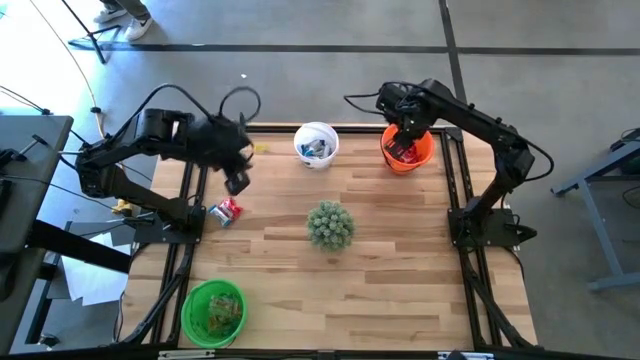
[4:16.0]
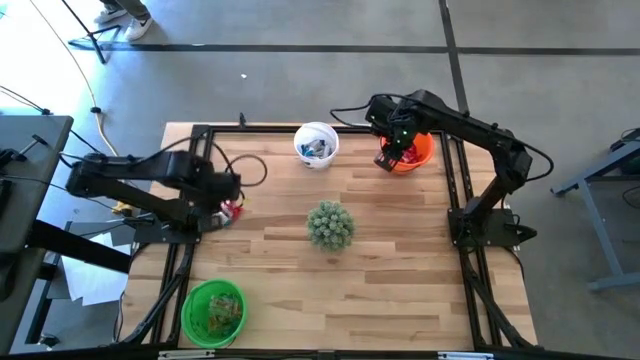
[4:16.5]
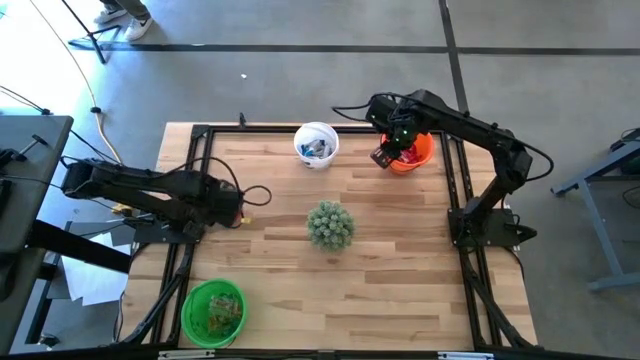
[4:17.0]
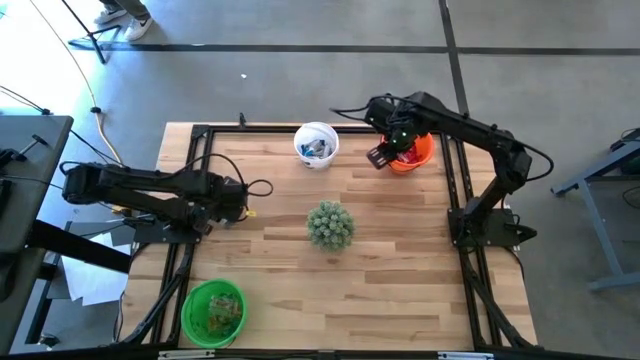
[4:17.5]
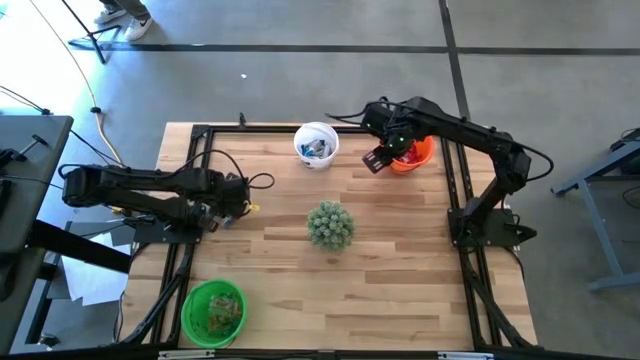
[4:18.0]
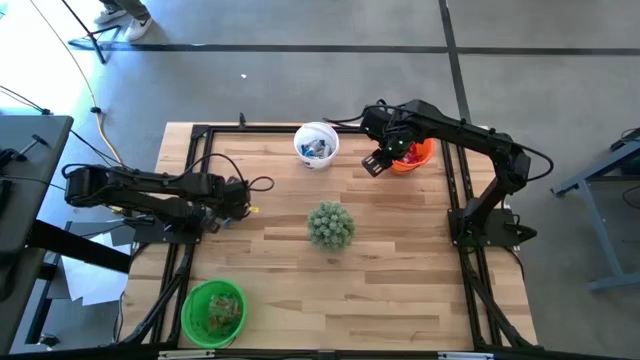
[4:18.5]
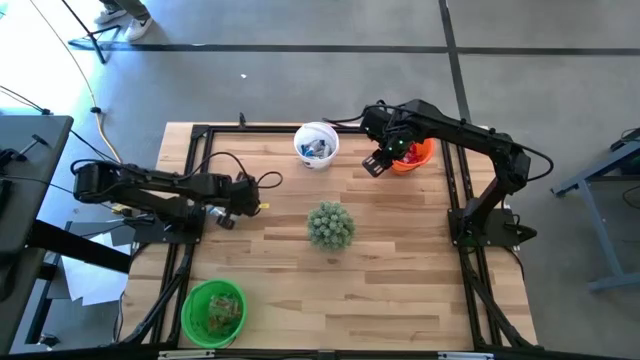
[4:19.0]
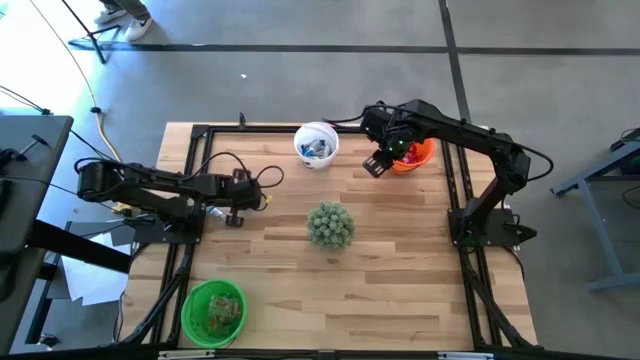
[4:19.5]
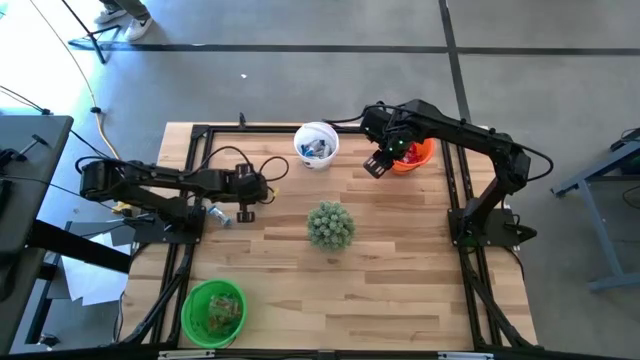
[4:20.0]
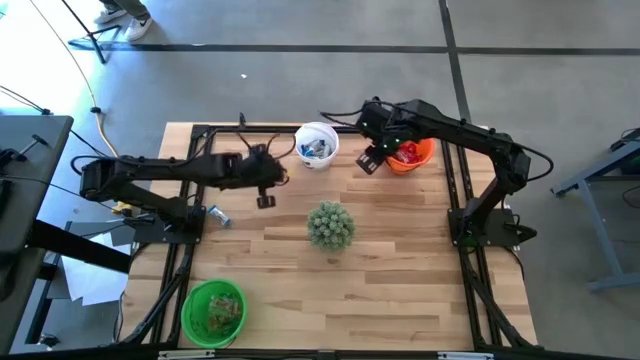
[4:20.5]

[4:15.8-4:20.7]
Task: Sort candy
Put the red candy into the orange bucket

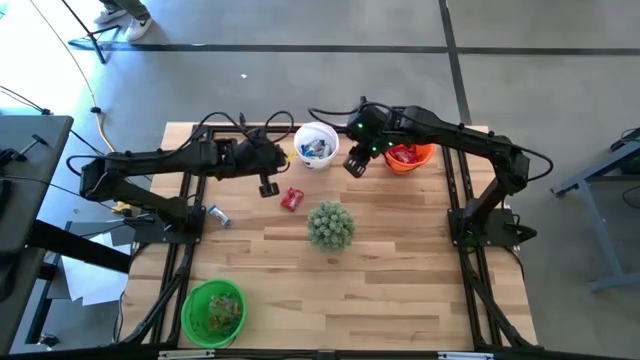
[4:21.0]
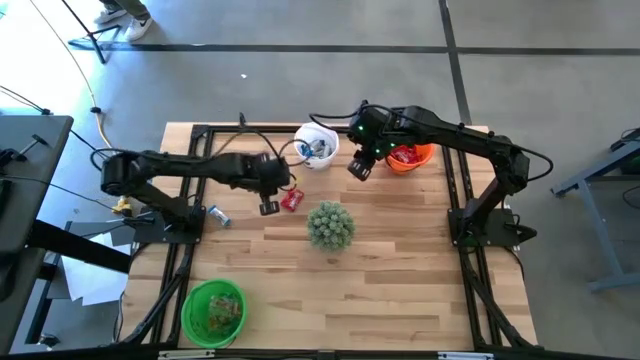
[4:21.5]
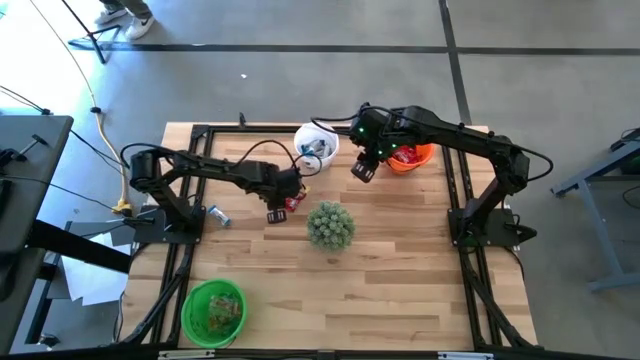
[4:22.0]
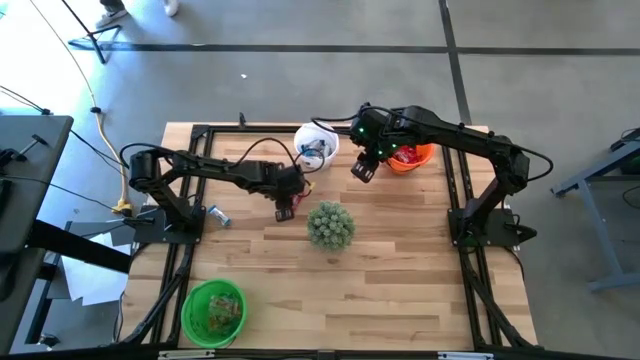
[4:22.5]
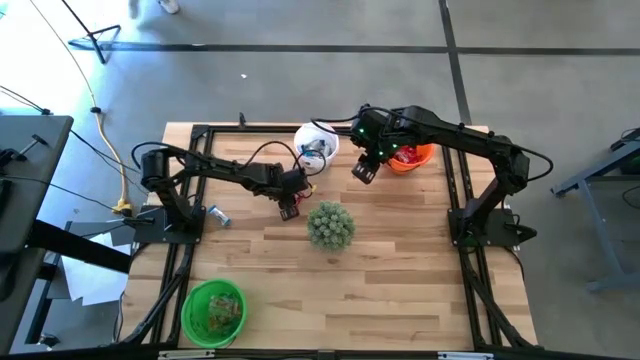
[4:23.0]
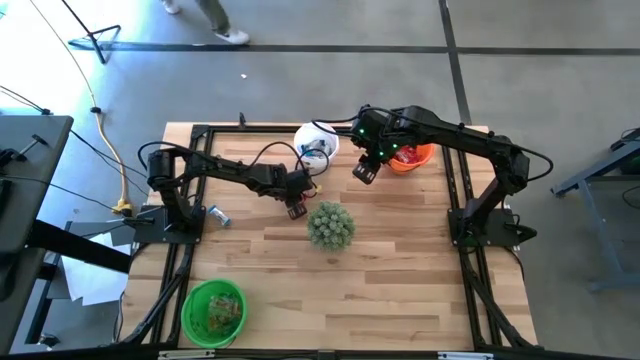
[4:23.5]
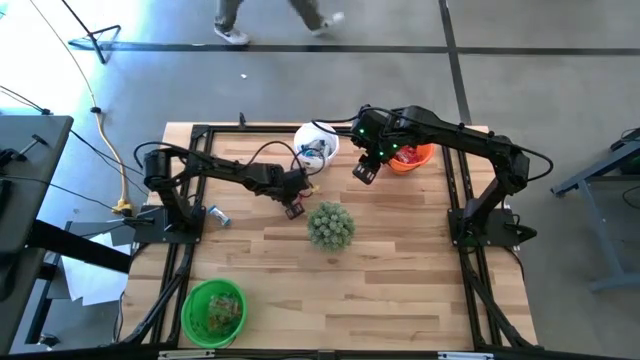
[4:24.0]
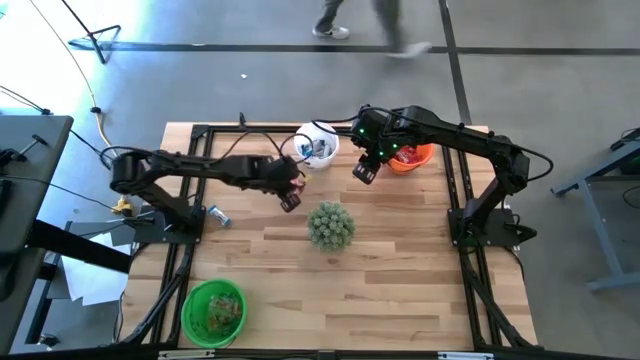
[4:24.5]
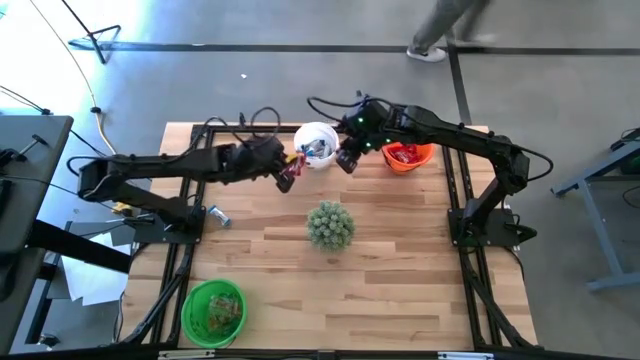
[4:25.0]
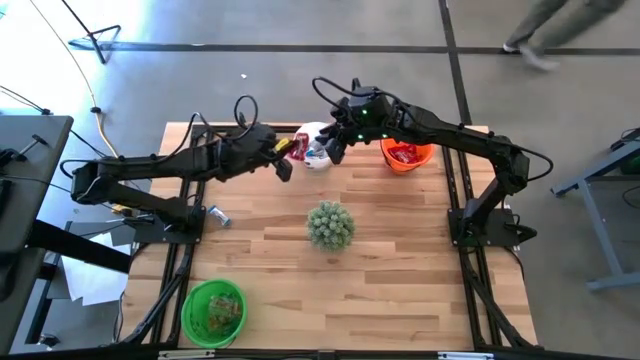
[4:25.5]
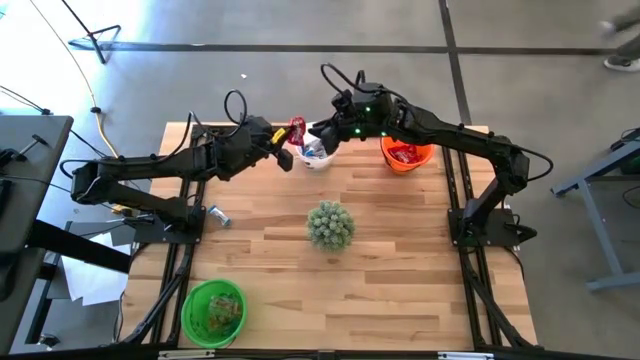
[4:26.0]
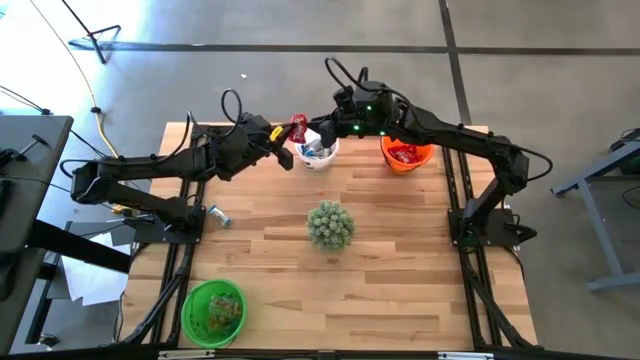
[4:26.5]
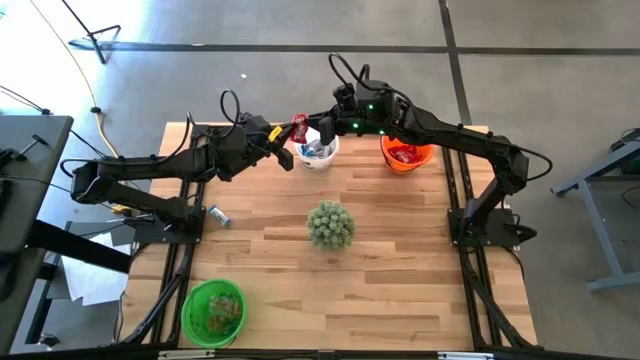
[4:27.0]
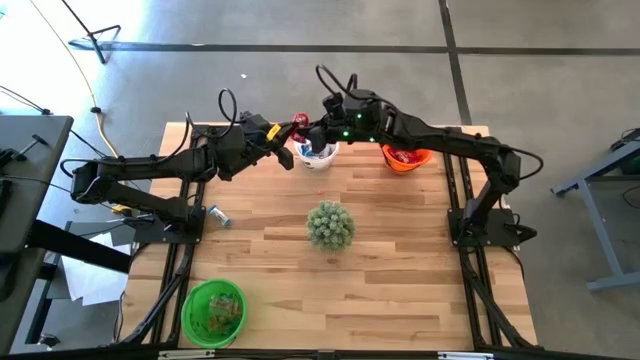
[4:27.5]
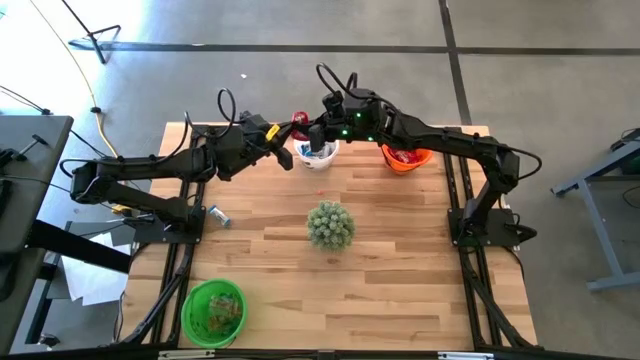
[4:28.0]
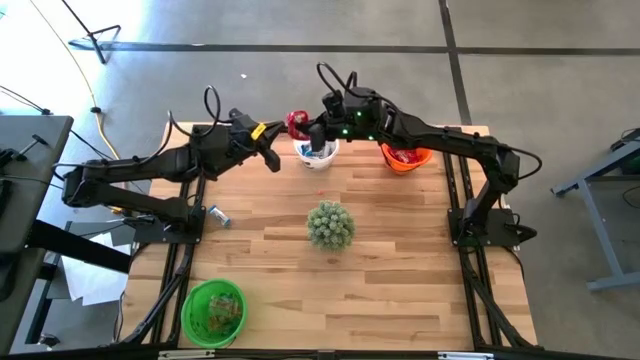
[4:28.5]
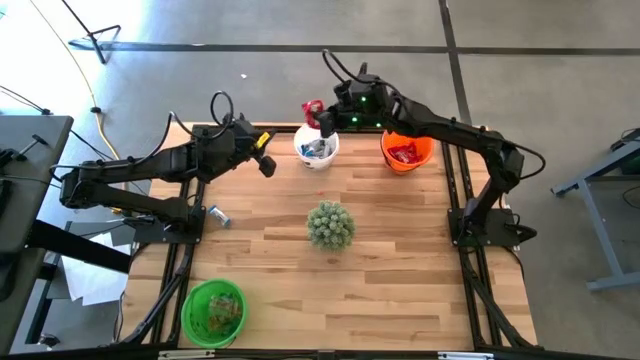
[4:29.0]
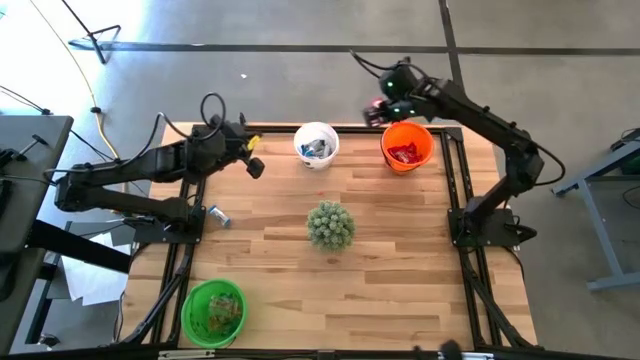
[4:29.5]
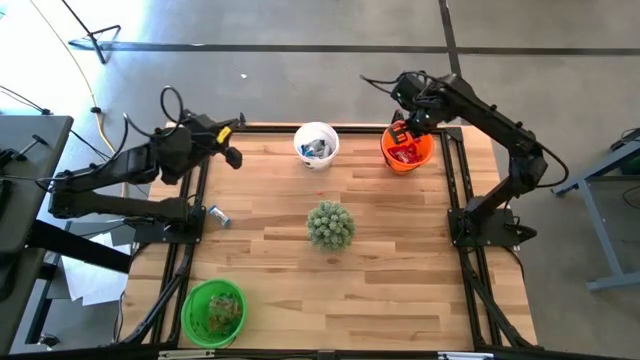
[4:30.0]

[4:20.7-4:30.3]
Put the red candy into the orange bucket

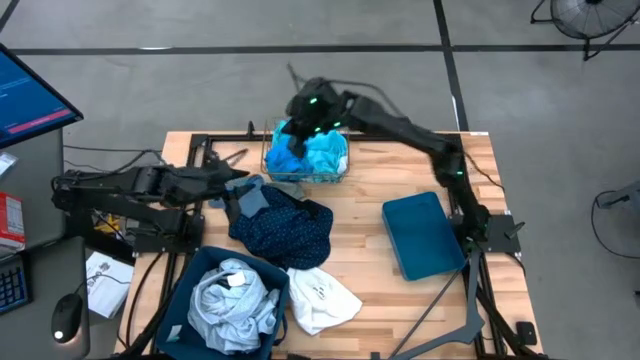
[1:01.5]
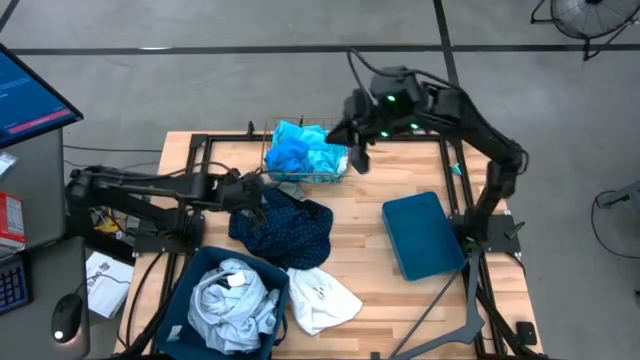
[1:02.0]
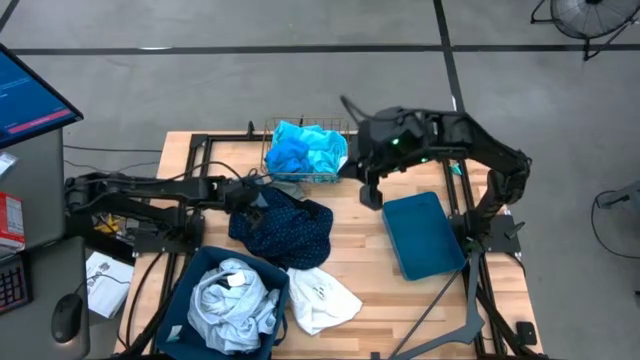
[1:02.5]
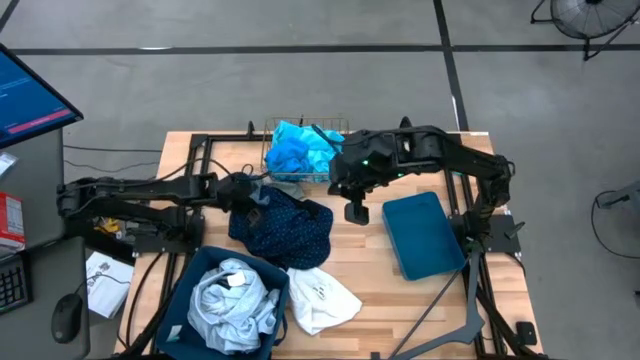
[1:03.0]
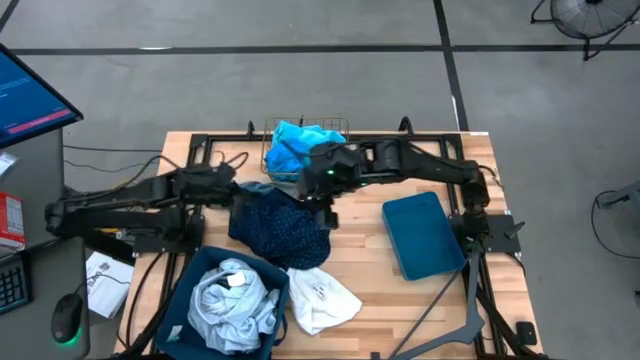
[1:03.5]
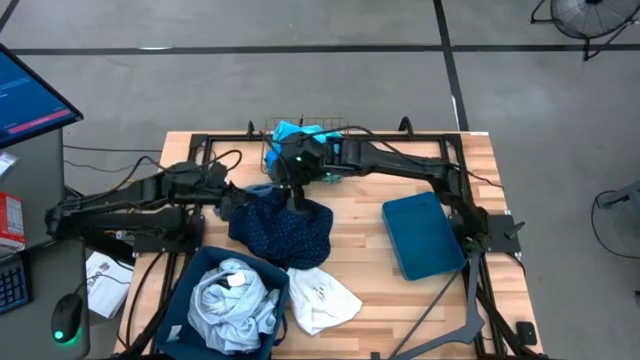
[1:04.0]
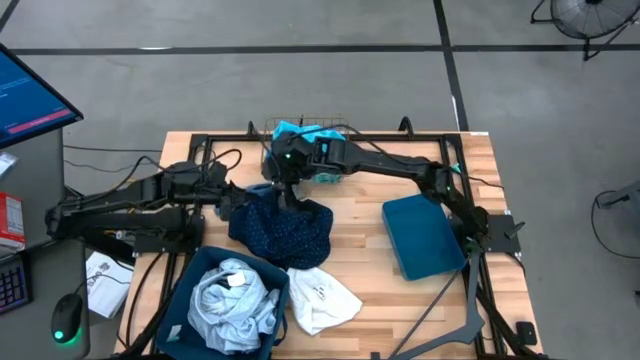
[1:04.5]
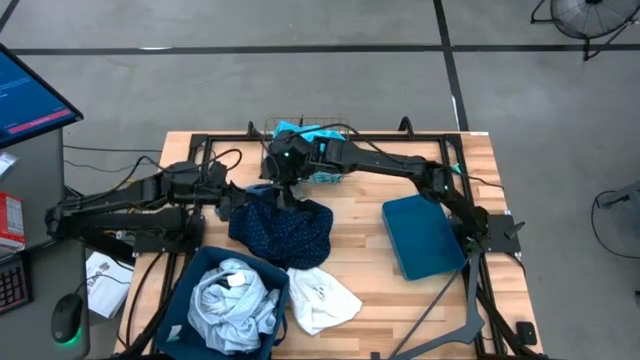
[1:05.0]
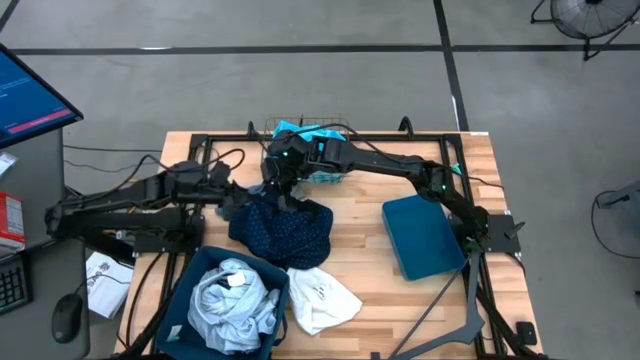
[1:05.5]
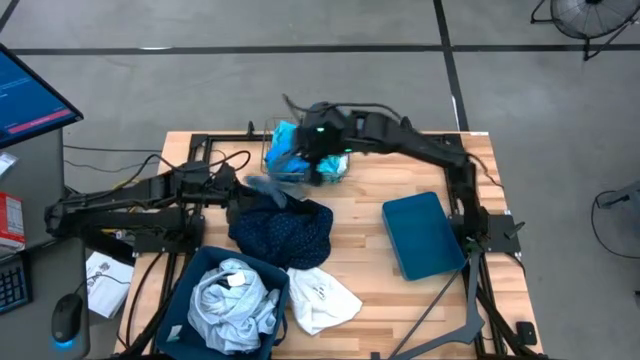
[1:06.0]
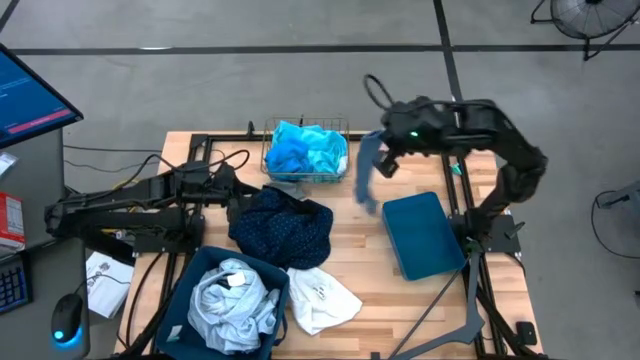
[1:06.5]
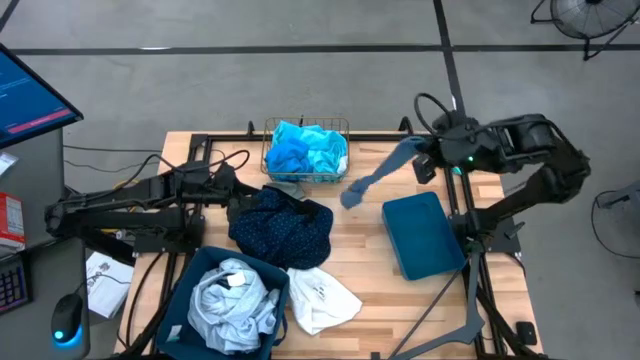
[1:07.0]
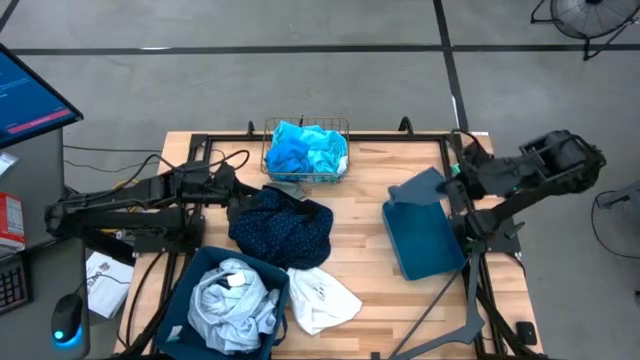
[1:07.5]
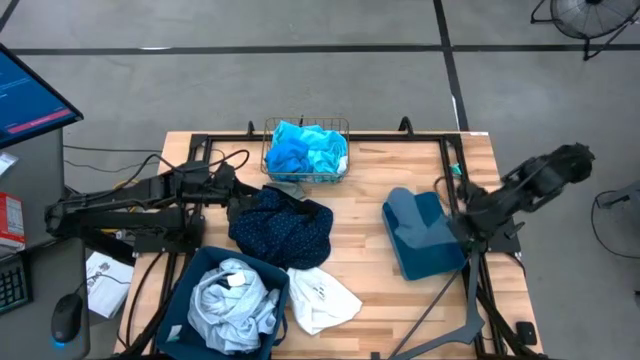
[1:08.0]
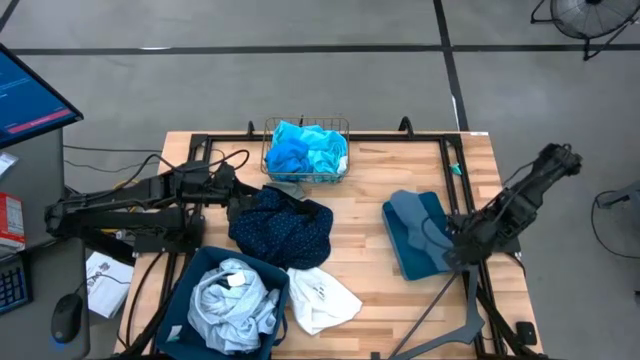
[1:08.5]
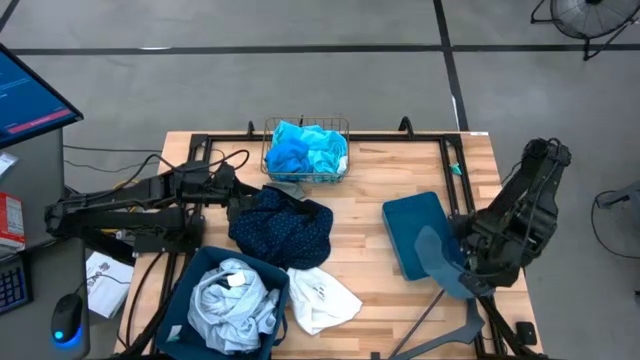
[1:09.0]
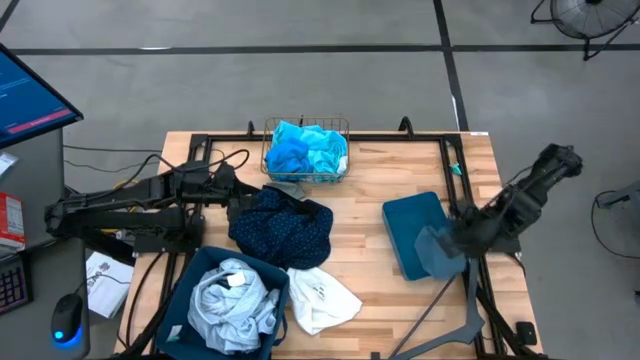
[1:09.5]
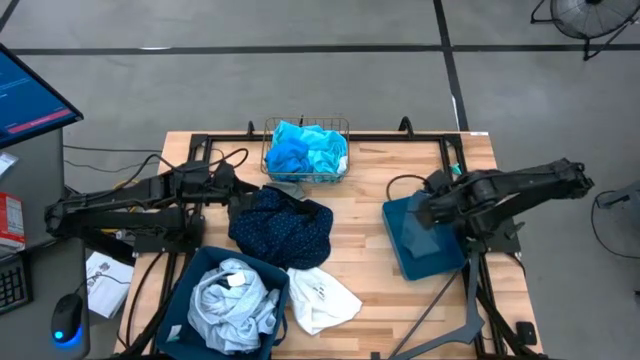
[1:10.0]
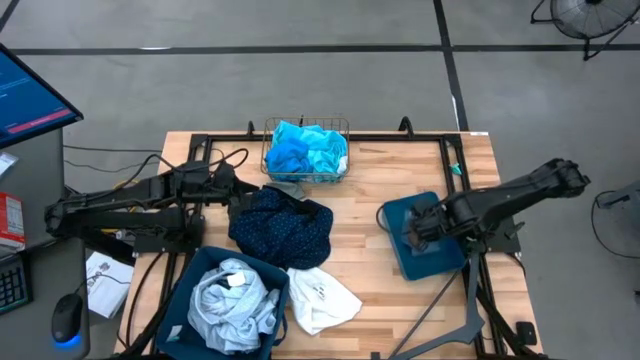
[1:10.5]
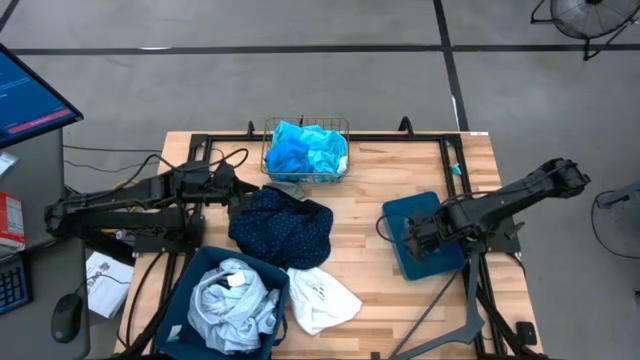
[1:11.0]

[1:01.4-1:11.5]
Task: Pick & Place Cloths
Put the gray sock into the blue bin
